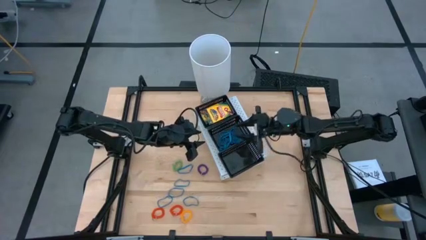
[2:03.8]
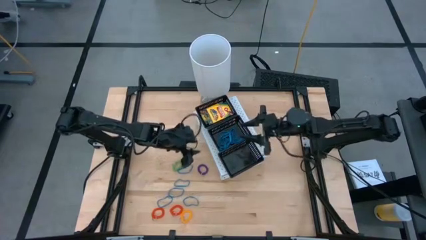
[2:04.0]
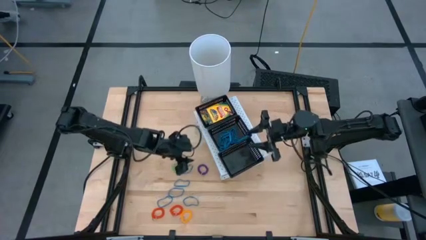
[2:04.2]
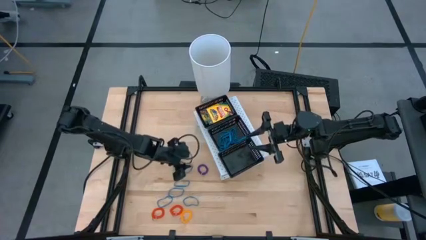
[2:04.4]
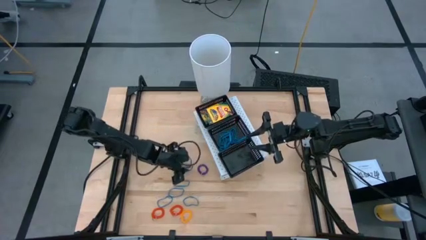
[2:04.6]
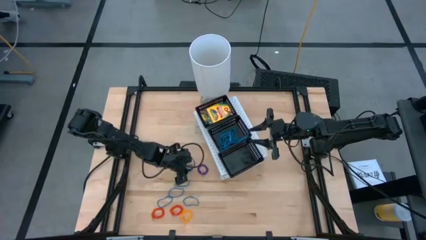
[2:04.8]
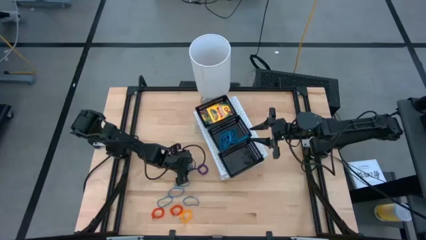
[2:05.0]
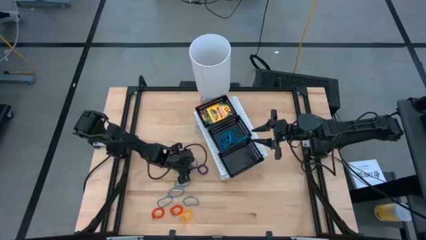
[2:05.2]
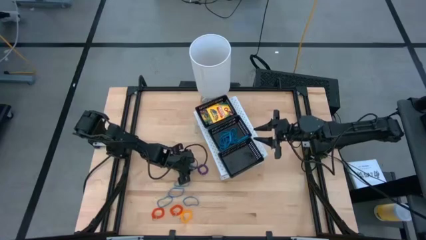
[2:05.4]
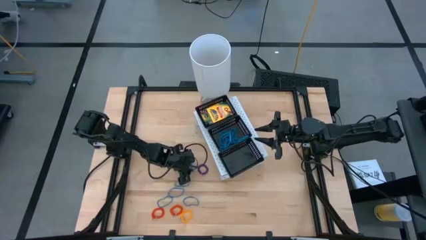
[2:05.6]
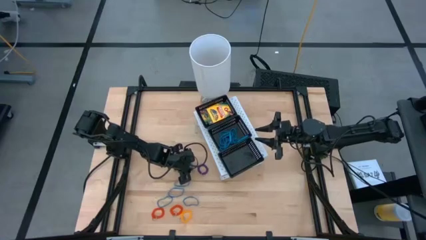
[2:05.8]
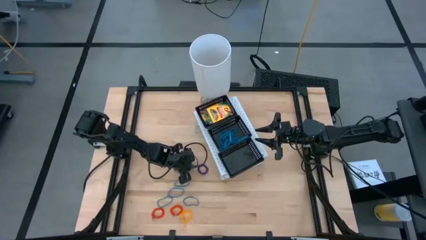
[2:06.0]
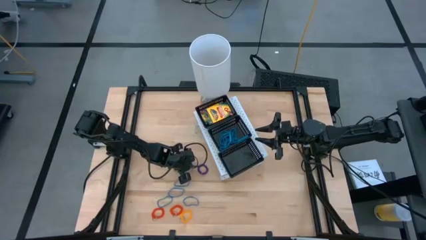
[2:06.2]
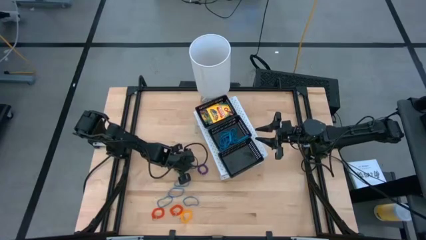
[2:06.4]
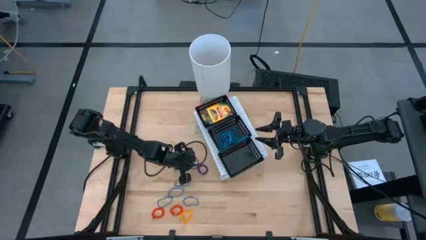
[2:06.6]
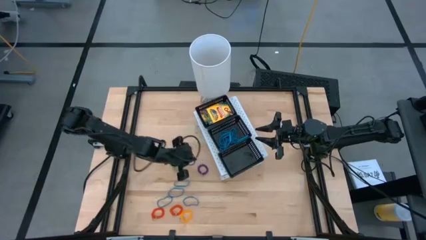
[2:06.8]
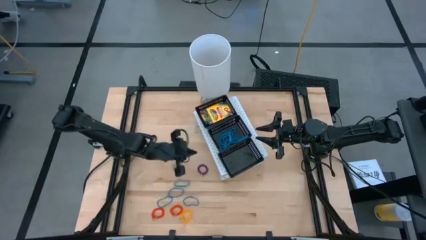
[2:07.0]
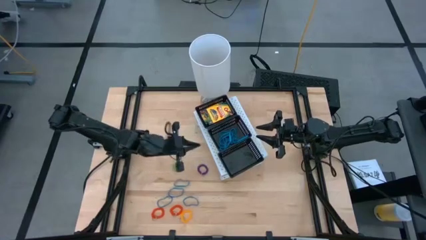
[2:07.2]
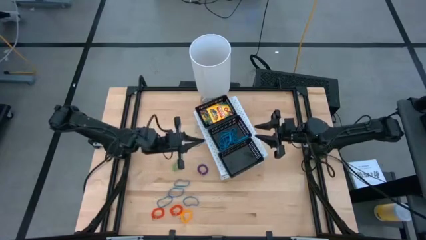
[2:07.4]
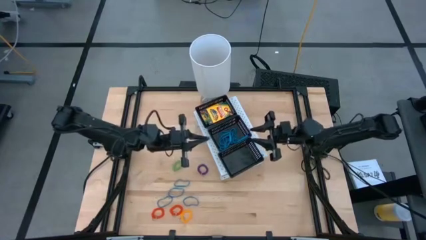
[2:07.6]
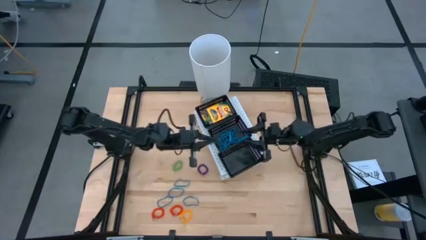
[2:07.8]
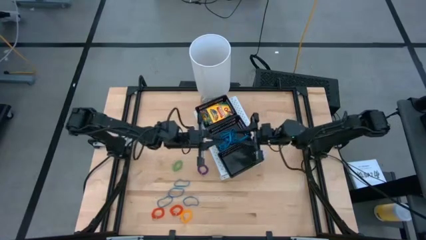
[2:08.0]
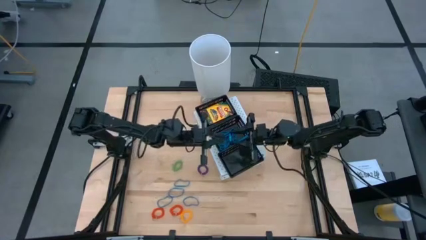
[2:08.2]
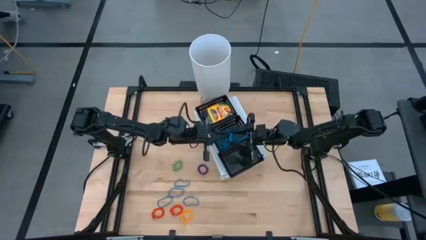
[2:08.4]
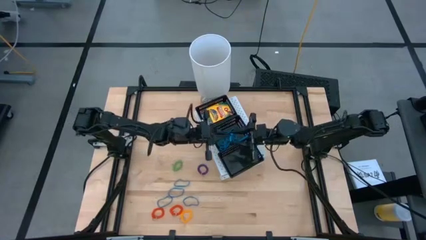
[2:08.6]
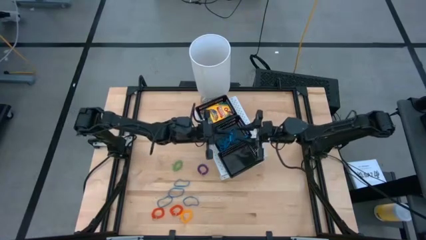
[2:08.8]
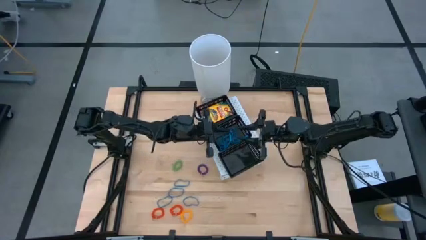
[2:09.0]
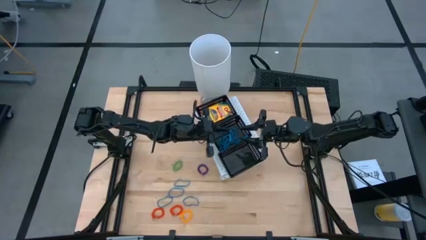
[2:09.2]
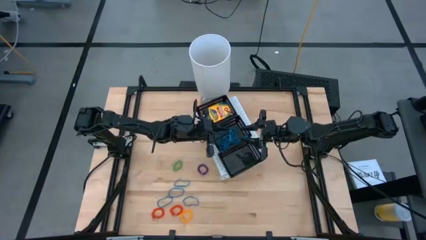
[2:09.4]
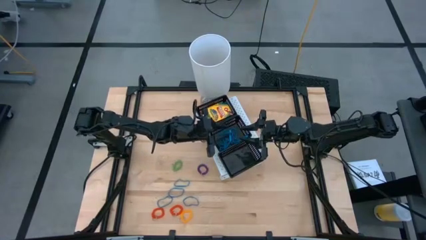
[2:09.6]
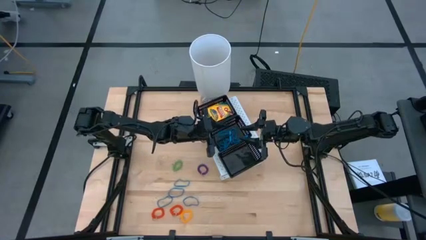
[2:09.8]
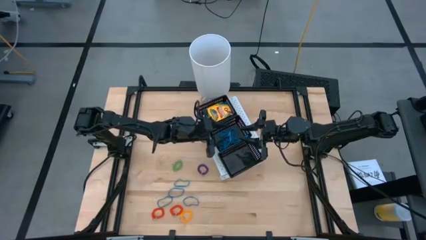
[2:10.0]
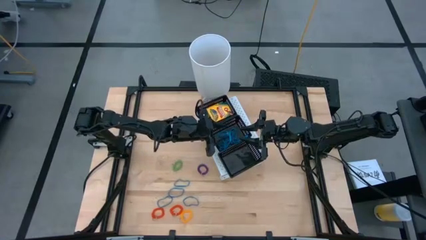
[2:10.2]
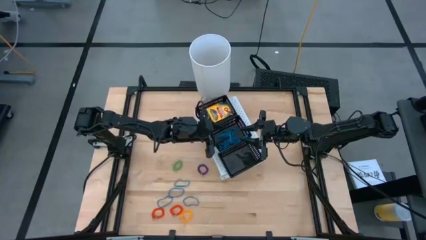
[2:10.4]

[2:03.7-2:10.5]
Task: Pick & Place Office Desk Supplies
Put the blue rubber band into the middle black bin on the shelf

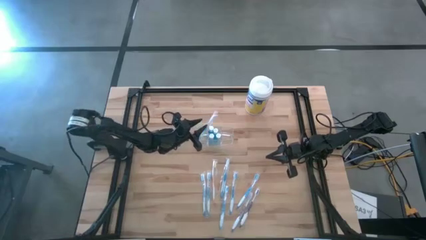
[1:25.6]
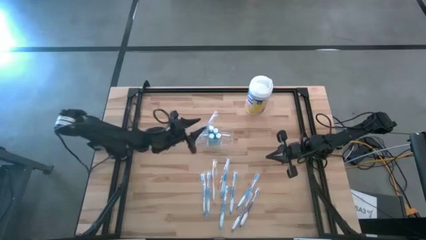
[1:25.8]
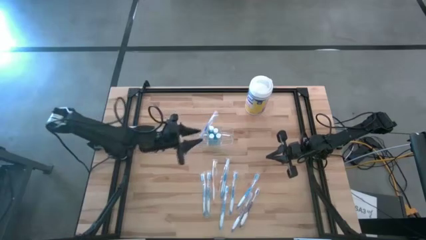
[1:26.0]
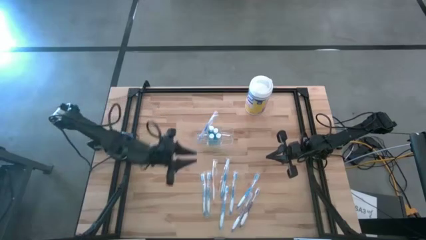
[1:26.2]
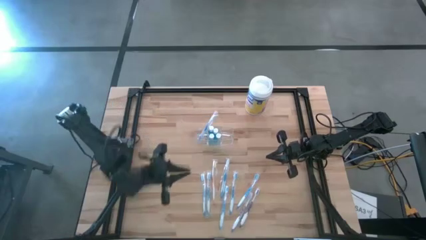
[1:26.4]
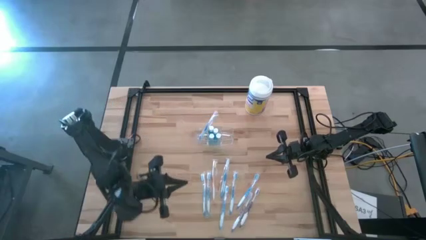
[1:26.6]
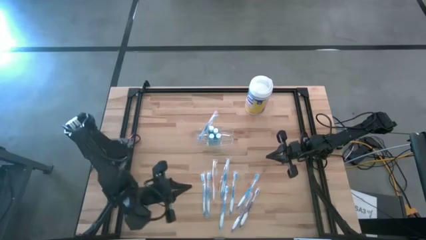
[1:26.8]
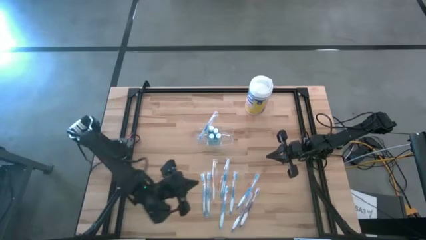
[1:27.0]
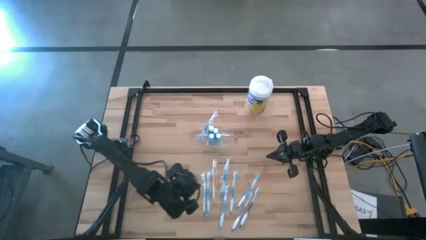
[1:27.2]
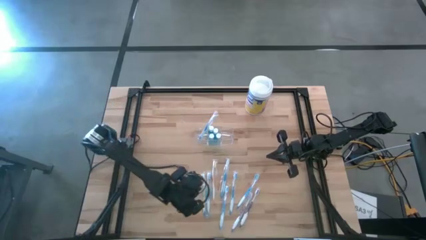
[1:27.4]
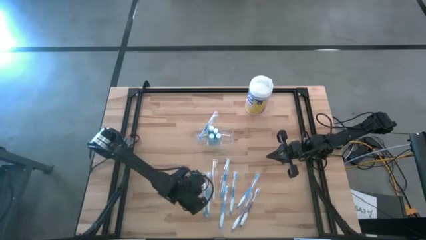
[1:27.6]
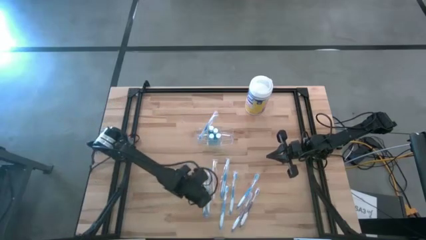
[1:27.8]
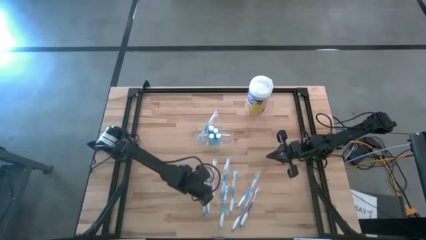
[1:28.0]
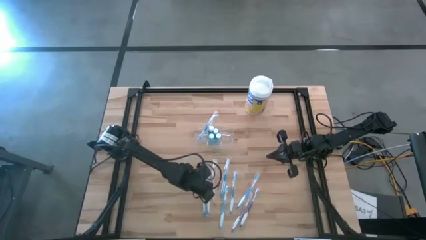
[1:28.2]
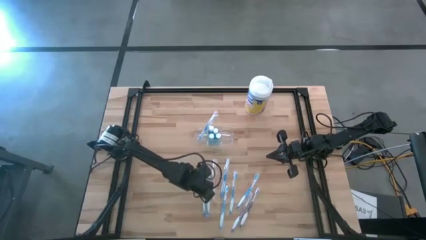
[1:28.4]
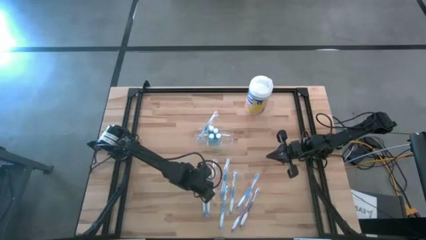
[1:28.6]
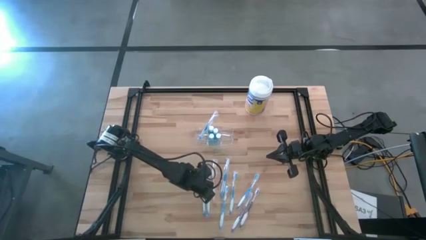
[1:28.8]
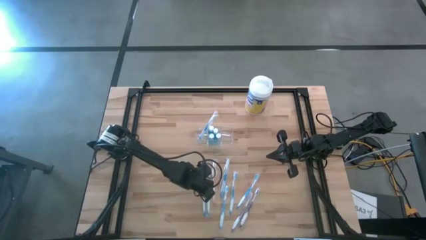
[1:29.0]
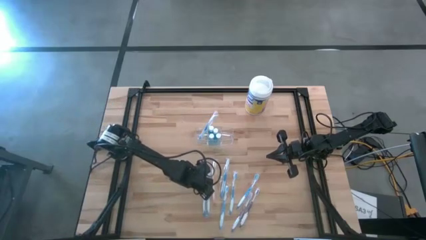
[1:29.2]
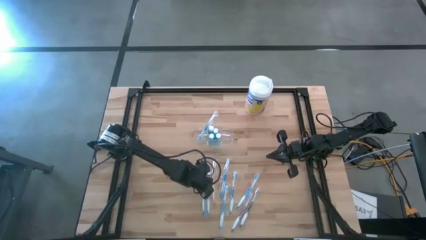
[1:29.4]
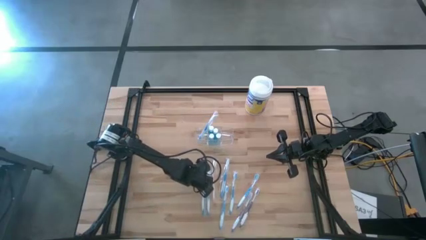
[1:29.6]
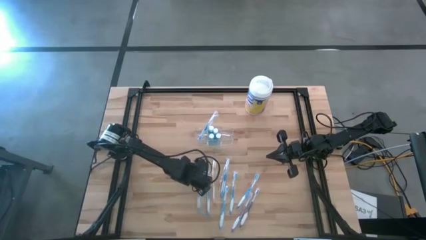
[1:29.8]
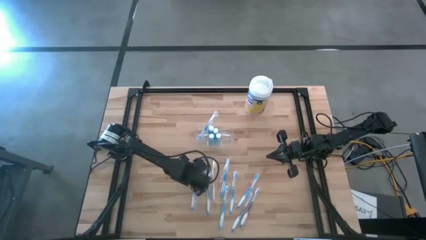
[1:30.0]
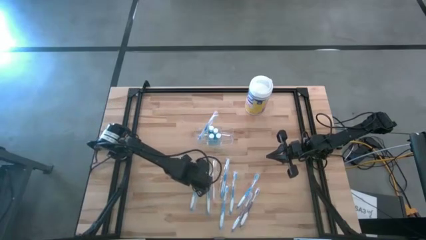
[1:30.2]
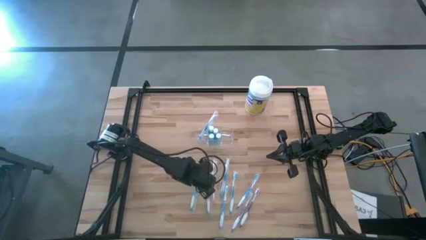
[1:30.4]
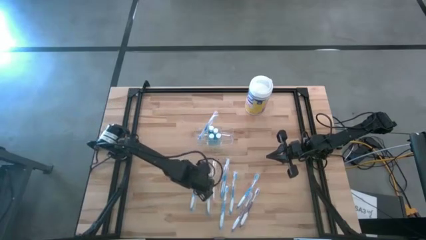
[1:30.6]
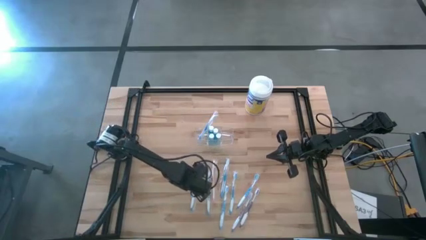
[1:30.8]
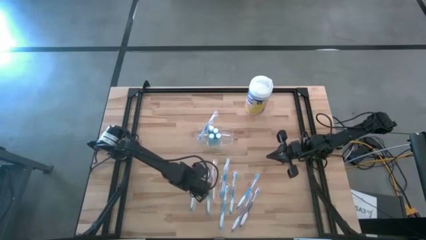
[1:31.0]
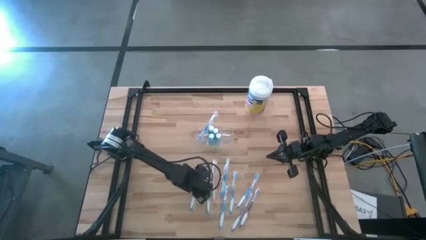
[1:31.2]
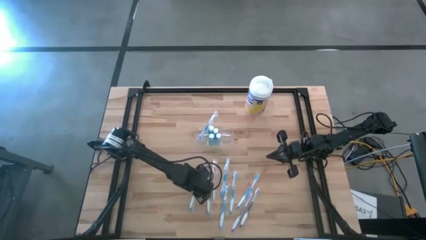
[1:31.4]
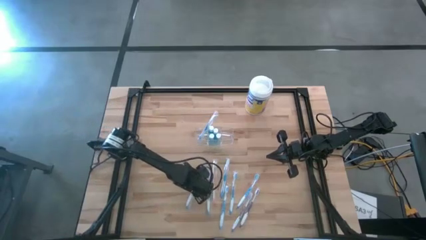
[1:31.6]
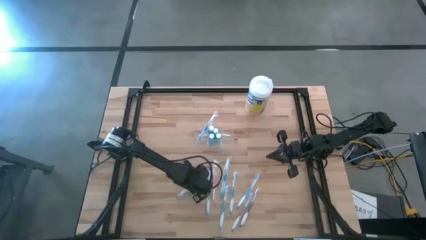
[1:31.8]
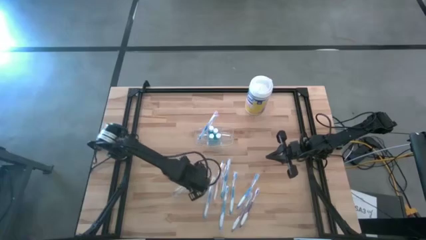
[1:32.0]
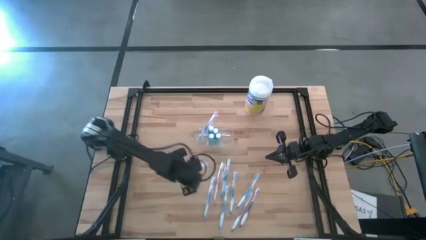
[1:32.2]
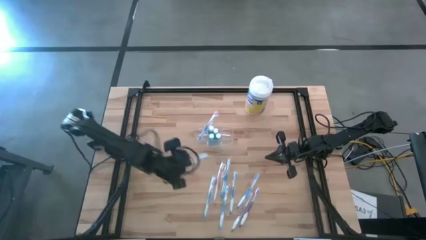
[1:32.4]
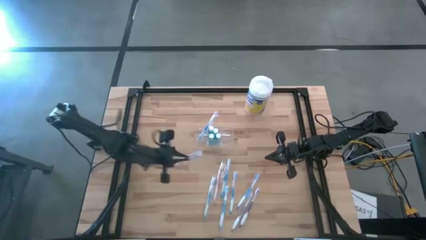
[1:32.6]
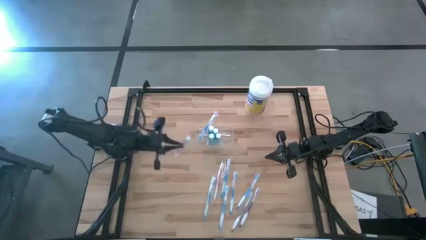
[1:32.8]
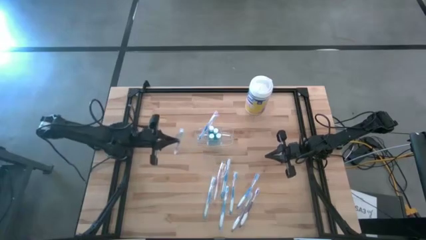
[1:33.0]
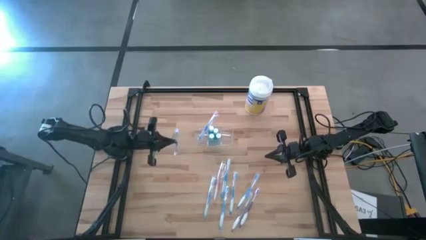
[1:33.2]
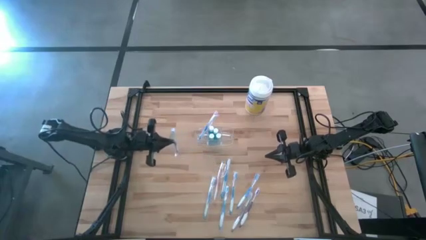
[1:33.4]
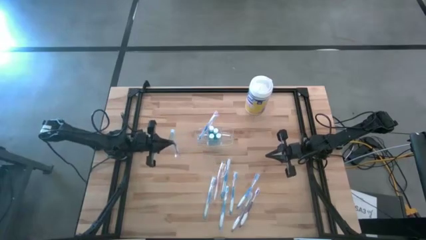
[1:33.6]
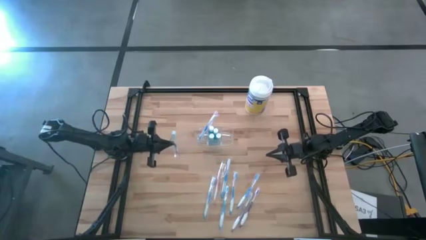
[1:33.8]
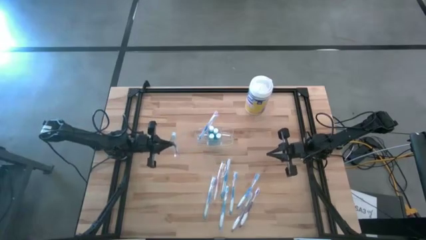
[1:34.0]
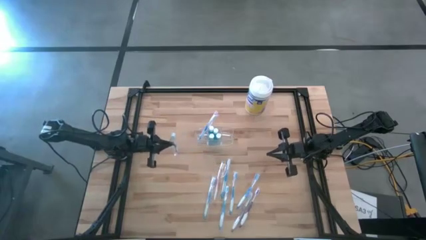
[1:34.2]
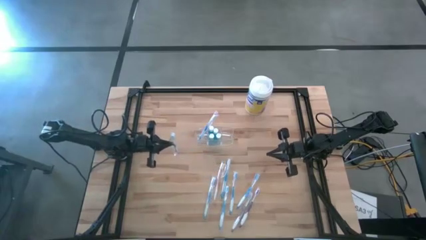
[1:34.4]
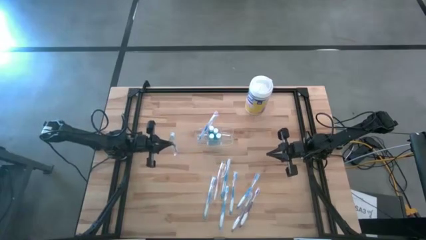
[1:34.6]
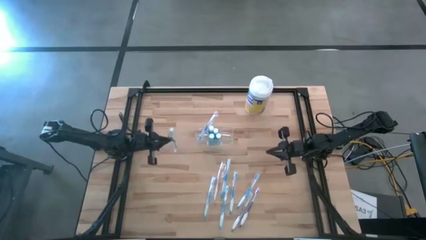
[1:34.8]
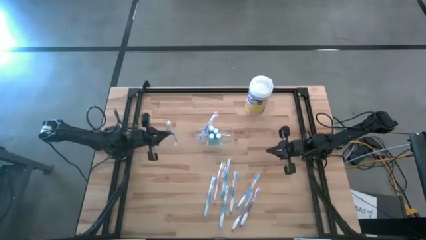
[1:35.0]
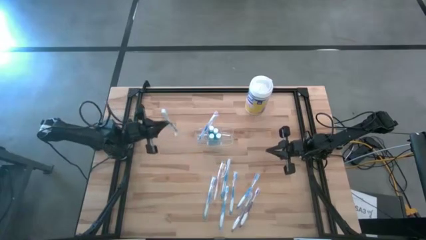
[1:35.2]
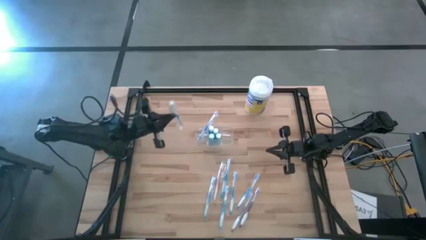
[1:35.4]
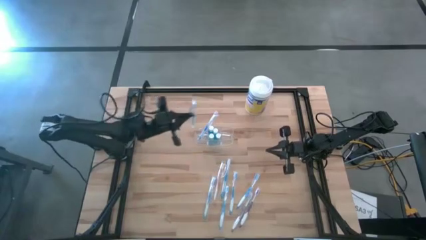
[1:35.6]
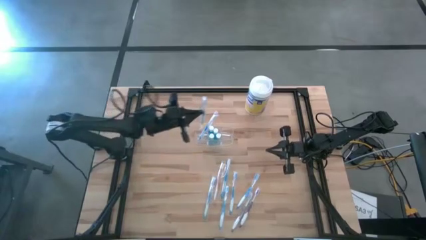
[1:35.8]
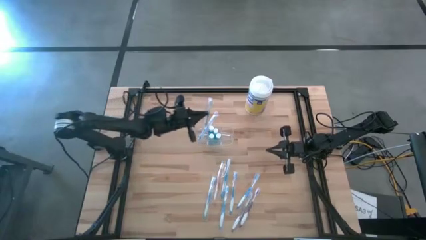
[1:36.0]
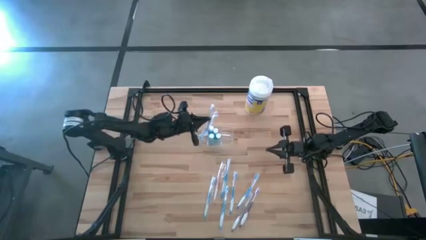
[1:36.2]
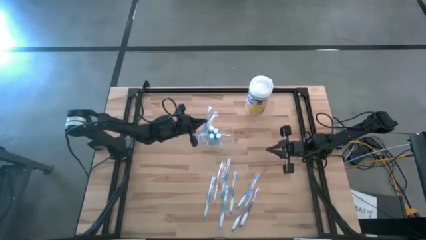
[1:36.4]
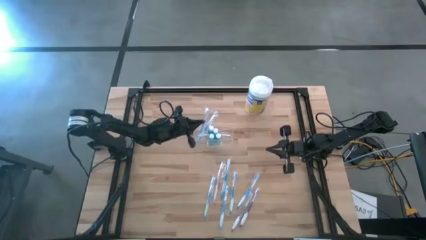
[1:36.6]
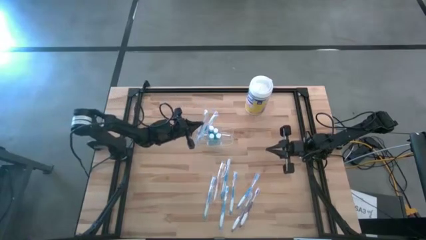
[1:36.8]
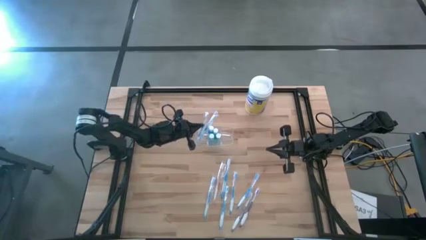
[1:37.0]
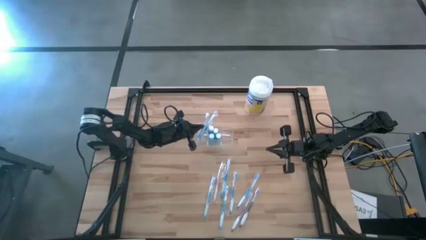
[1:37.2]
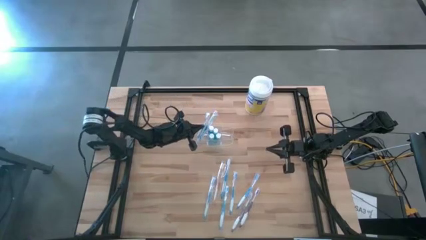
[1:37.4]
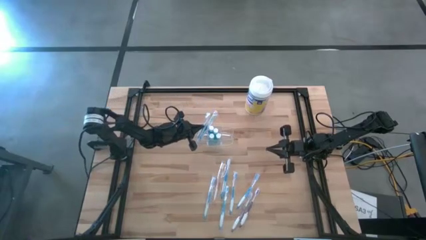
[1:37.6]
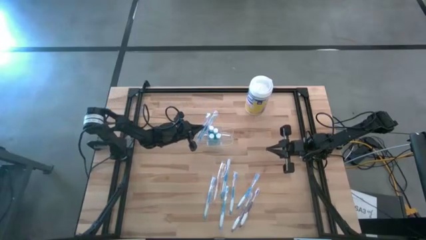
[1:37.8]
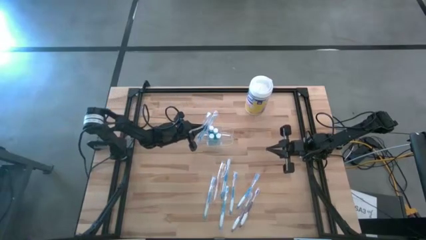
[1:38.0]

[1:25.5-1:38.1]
Task: Pick & Place toothbrushing station
Put the blue toothbrush into the transparent organizer
